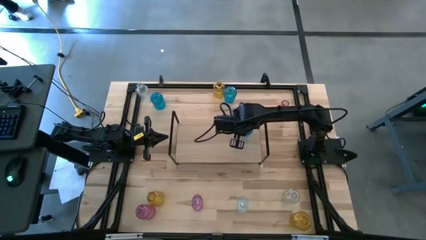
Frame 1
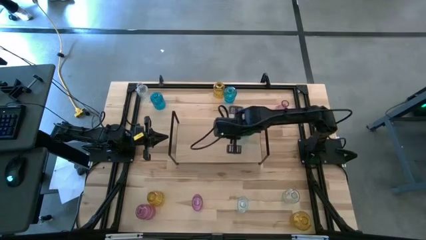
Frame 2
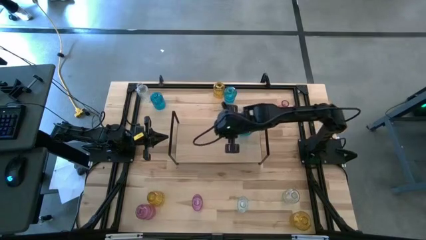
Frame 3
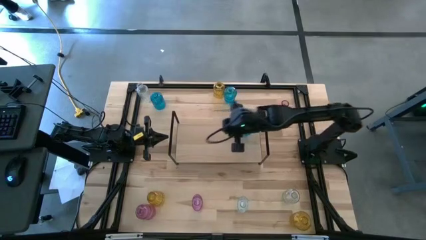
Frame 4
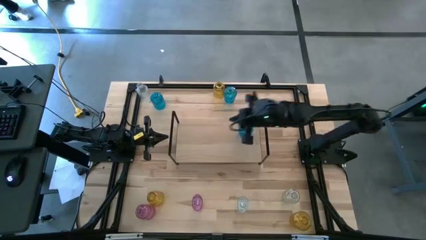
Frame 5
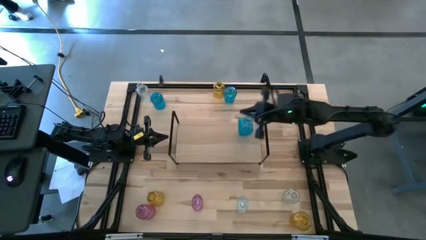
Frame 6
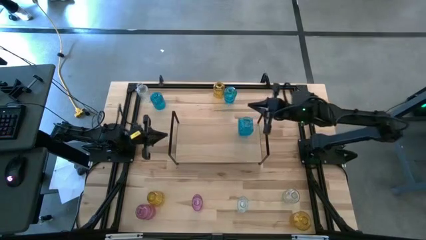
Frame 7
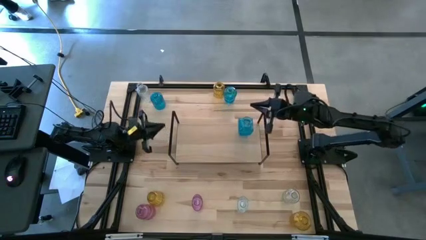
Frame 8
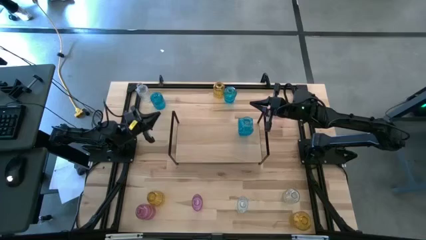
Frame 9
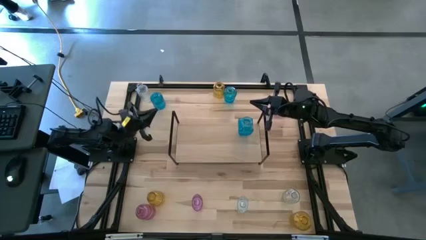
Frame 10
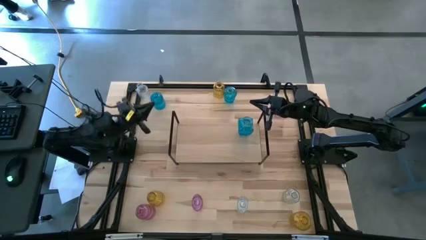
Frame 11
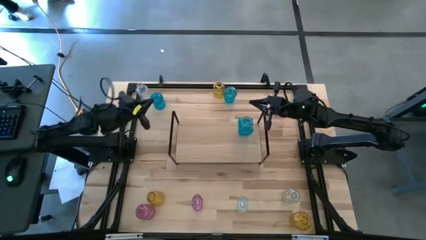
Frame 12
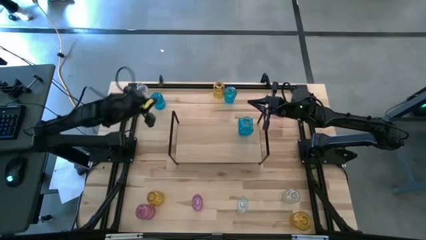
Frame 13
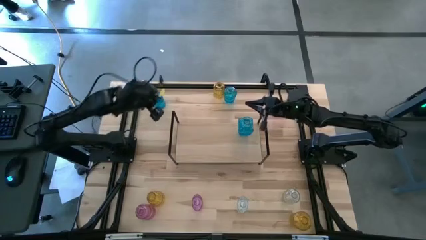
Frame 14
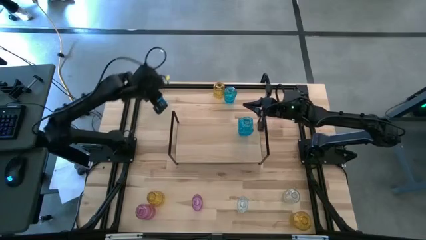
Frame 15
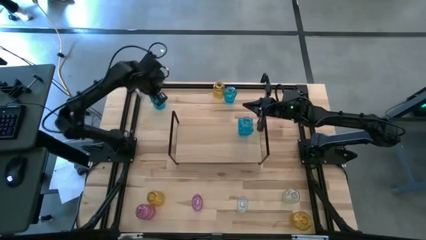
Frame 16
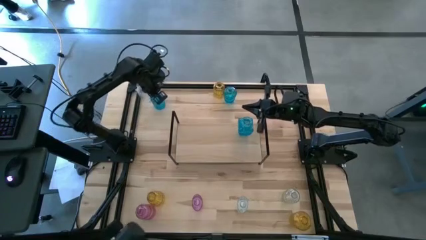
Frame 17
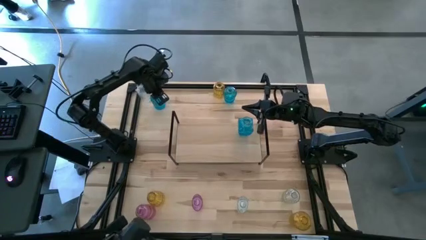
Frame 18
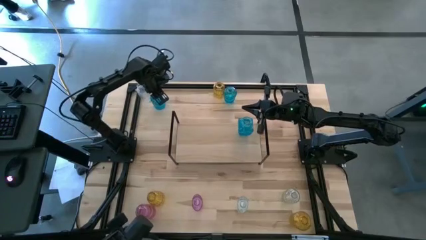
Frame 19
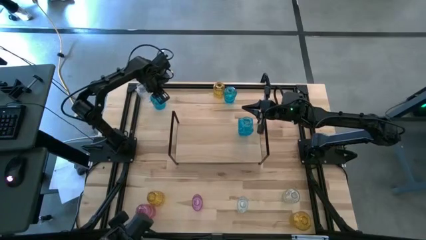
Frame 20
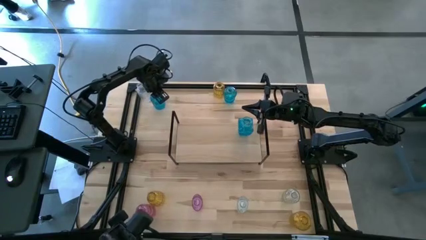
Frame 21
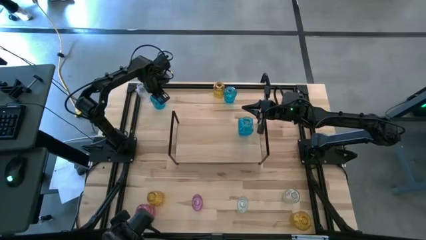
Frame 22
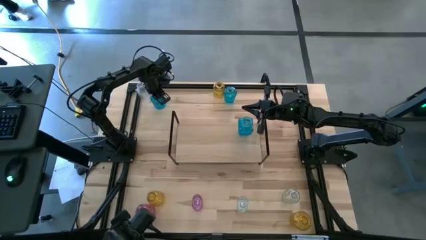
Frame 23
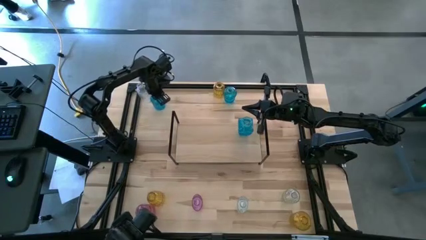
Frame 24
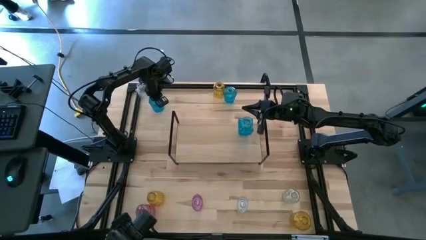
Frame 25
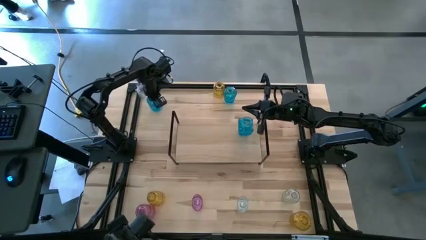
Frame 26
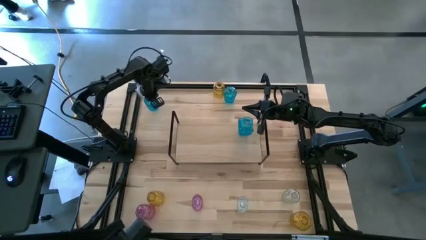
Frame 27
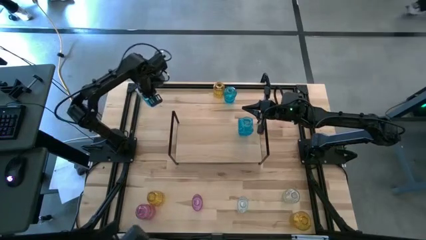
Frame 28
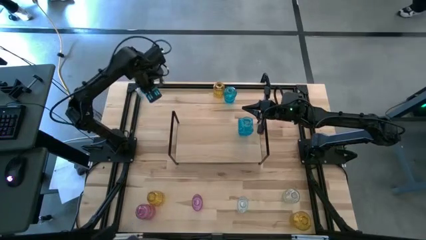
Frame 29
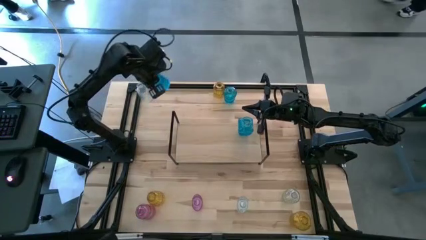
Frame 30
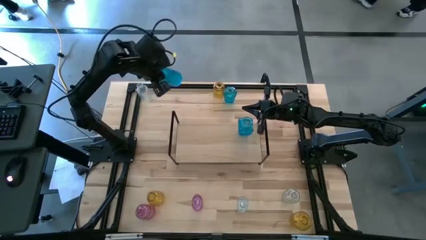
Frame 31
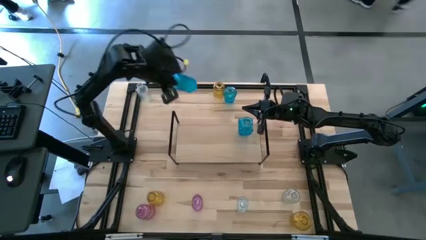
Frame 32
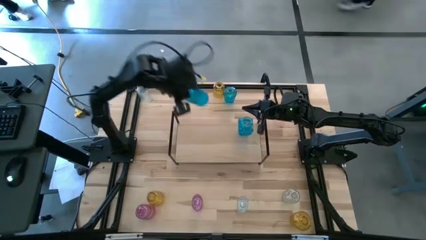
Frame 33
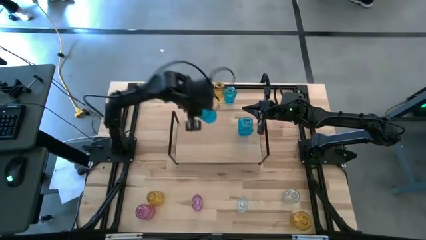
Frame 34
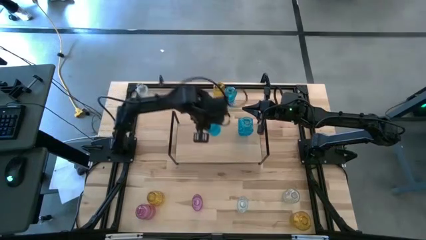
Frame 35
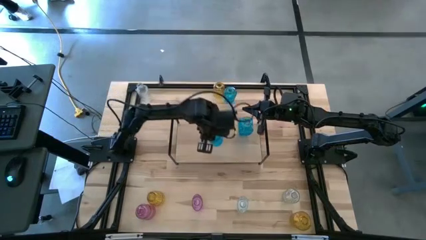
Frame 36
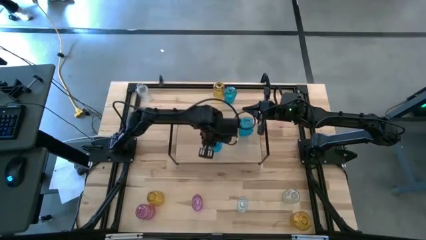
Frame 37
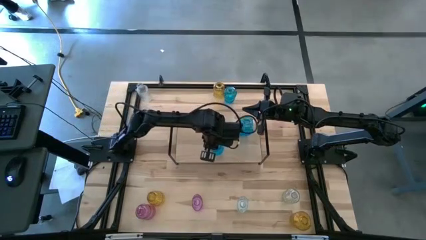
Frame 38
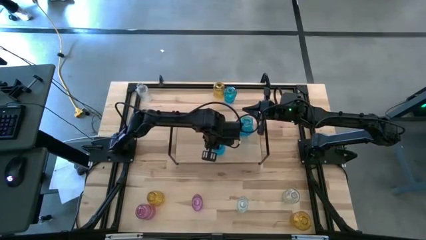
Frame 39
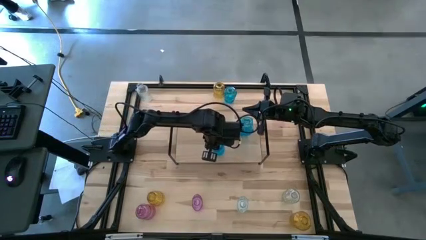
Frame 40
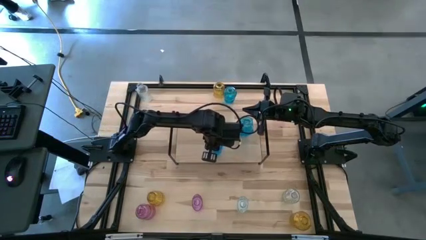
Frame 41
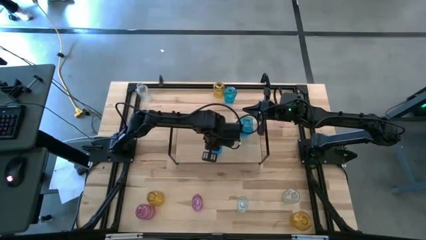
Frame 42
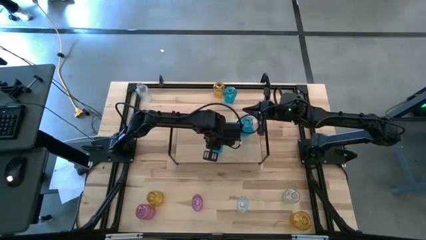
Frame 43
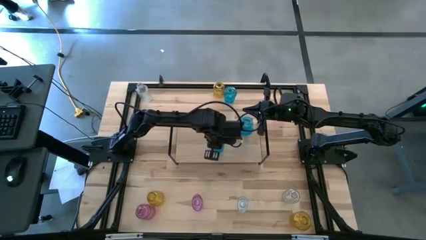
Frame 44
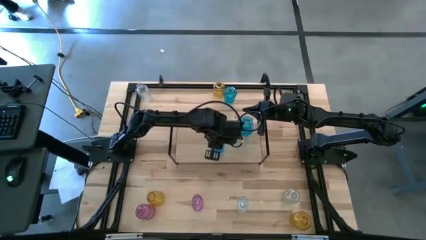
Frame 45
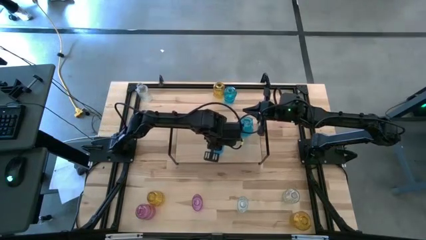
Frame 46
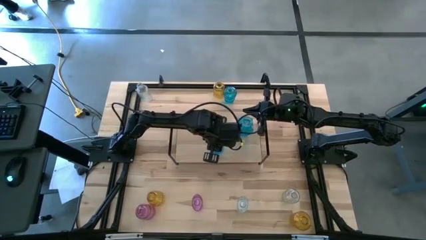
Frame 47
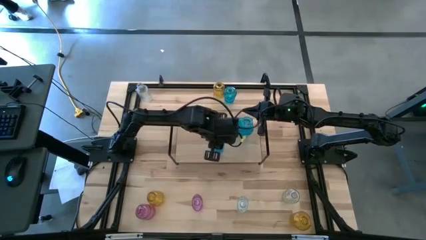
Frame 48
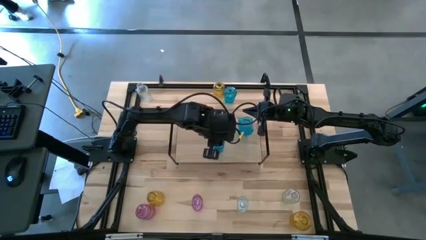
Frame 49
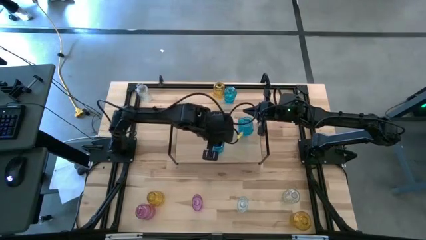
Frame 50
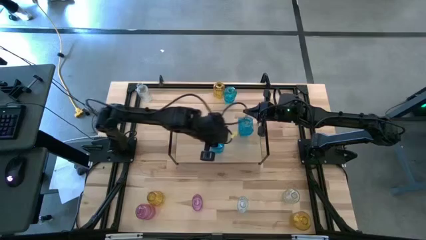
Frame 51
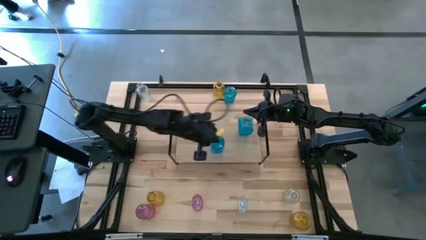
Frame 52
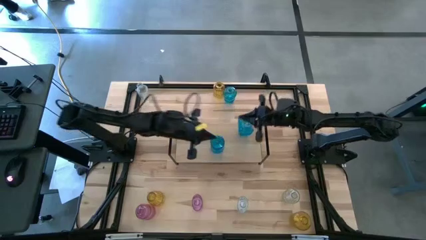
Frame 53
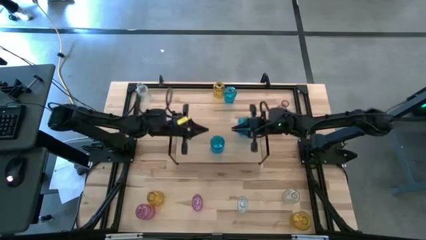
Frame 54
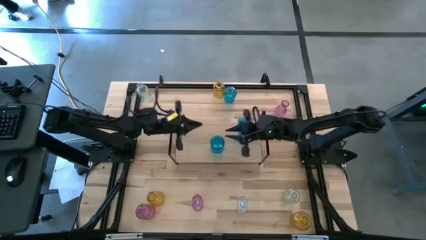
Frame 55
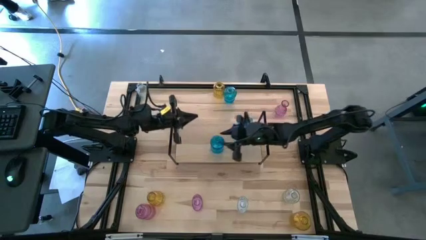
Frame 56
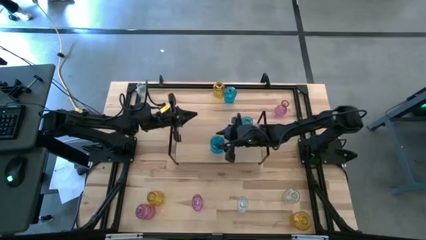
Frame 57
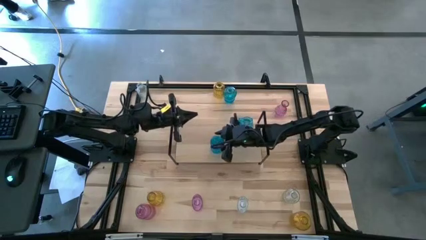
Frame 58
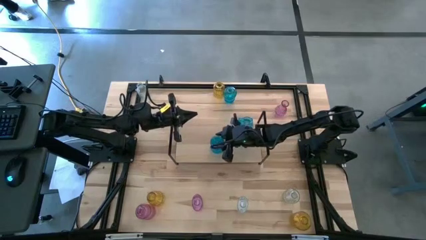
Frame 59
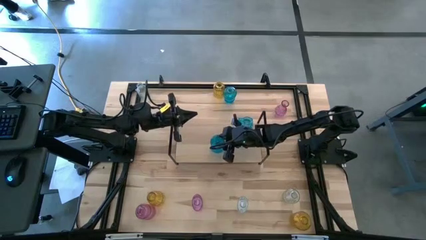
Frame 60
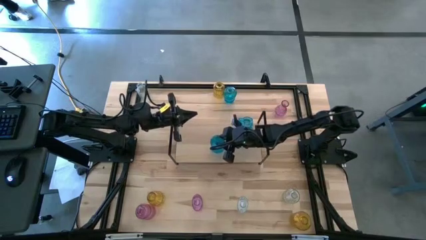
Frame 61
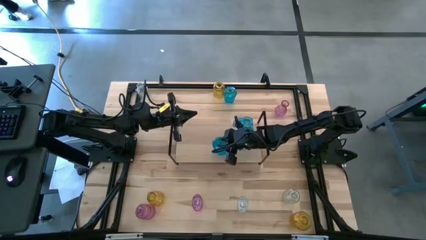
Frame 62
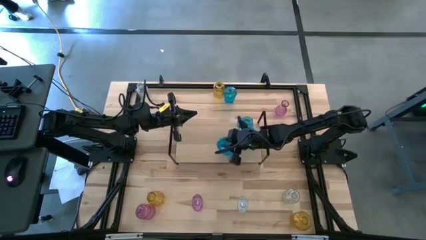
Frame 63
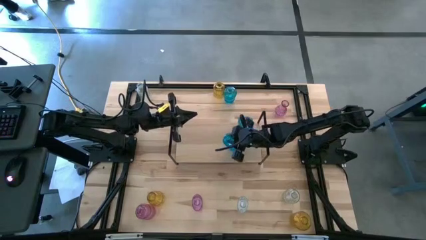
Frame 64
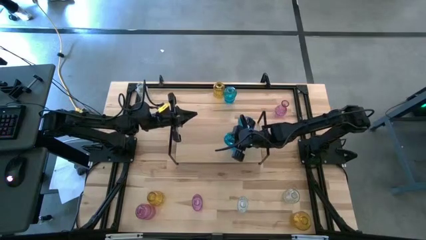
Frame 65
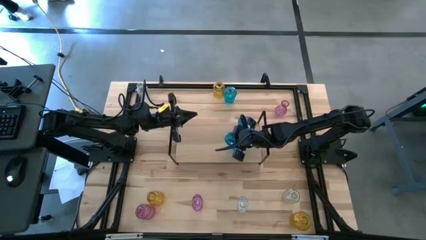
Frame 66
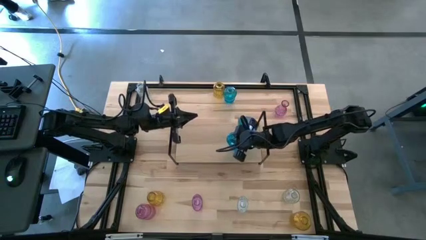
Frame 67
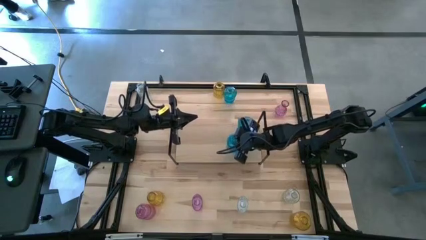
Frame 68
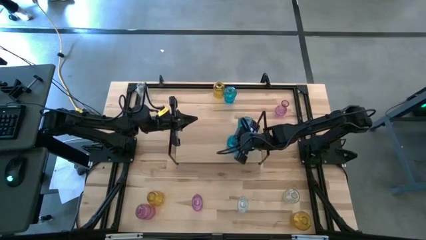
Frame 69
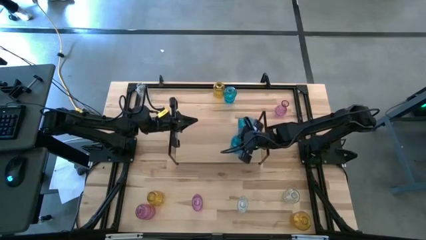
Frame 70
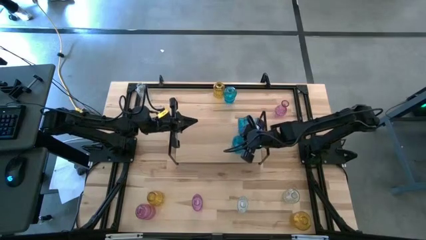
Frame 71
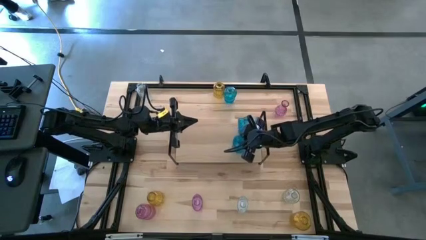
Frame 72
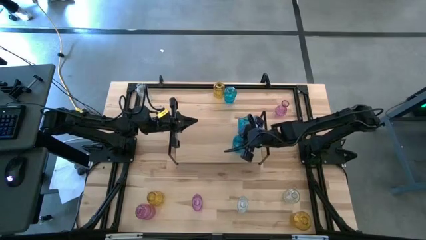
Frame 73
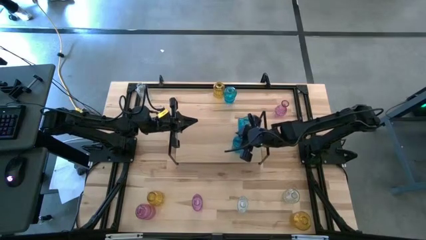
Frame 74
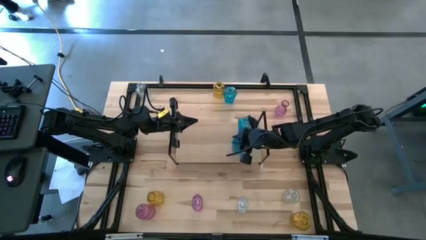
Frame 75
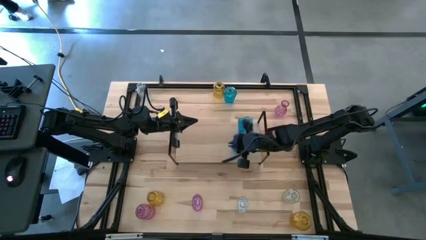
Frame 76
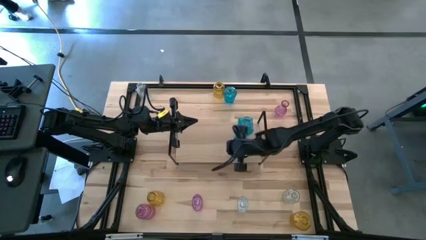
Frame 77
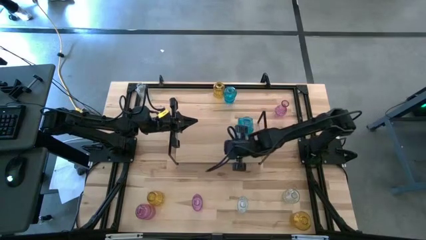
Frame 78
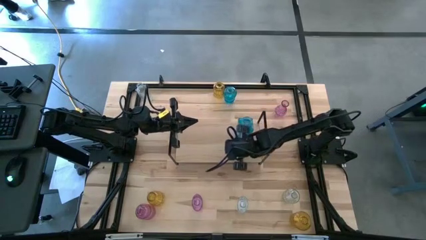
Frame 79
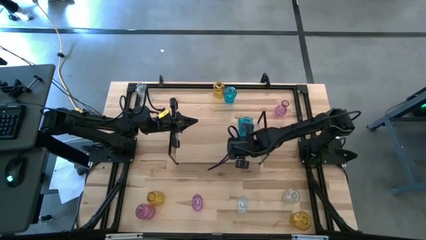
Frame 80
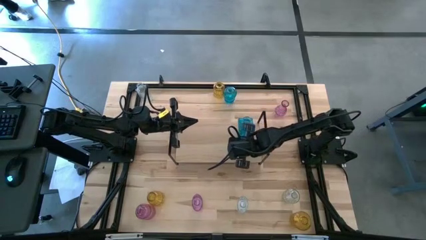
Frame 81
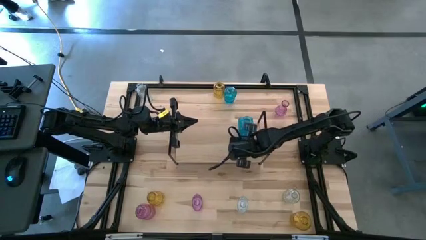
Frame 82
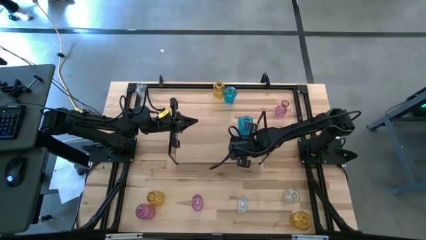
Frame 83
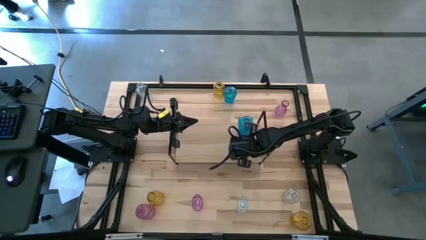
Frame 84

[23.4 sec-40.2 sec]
Task: sort vases onto shelf
Put the left blue vase aligned with the other blue vase on the shelf
